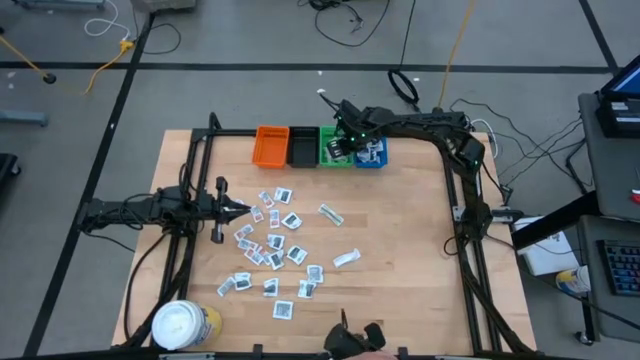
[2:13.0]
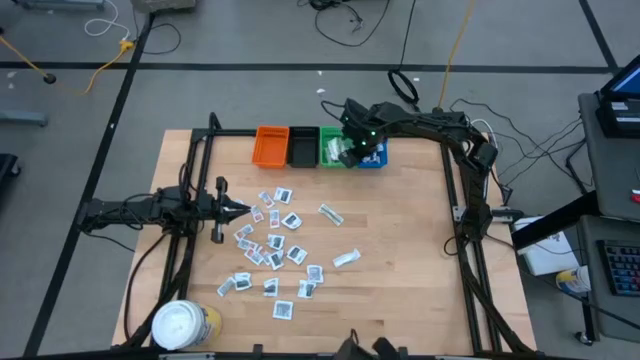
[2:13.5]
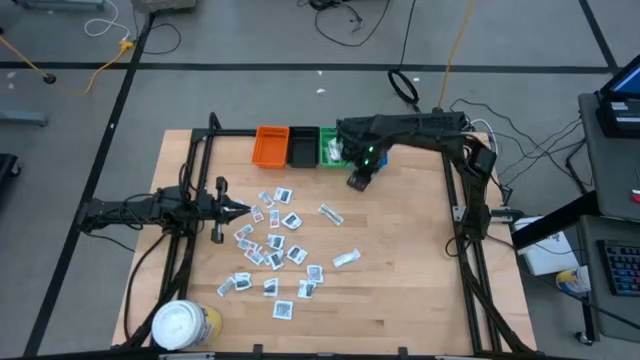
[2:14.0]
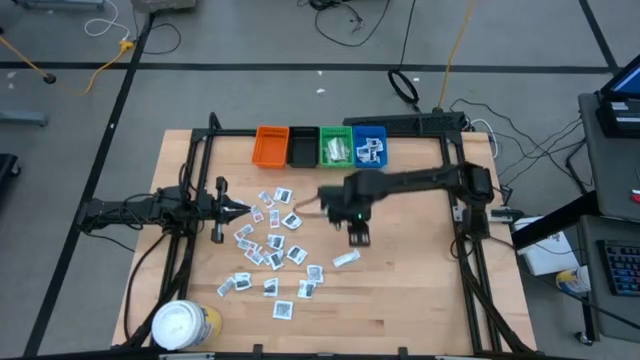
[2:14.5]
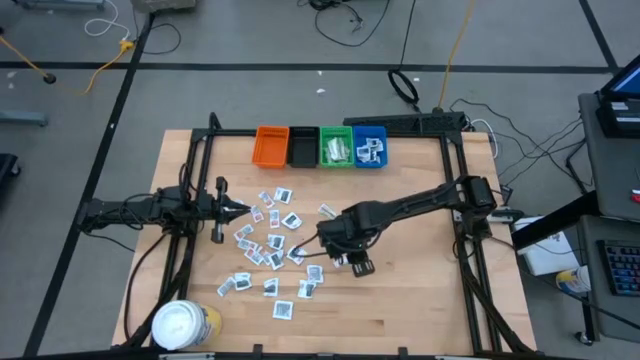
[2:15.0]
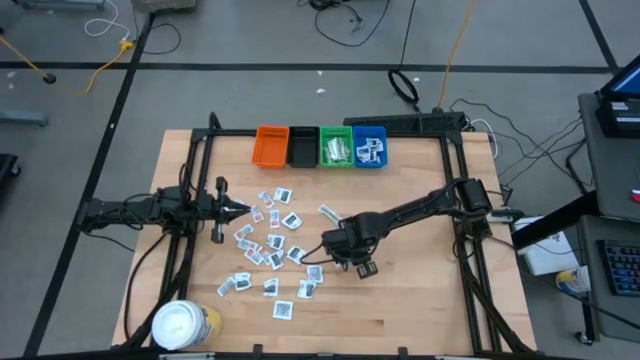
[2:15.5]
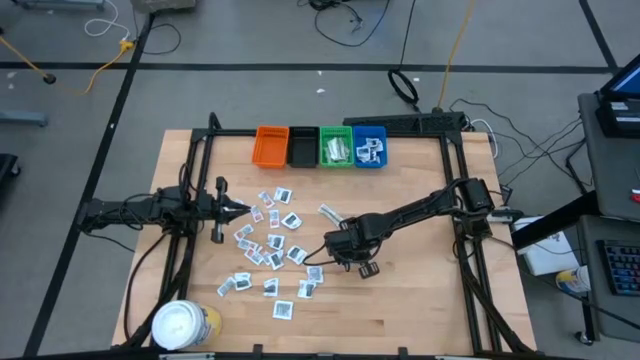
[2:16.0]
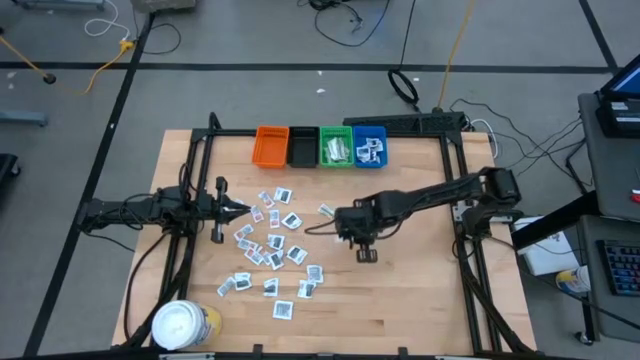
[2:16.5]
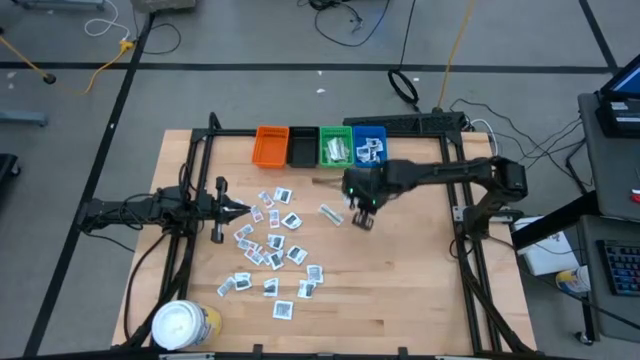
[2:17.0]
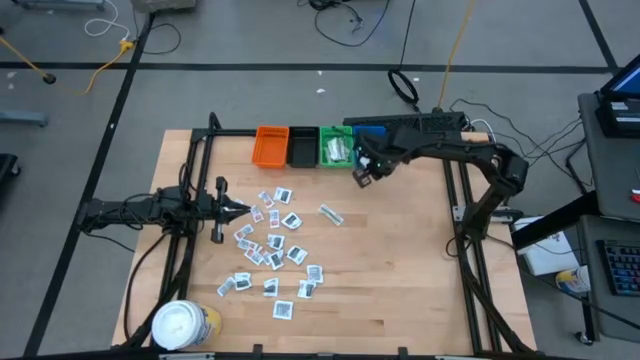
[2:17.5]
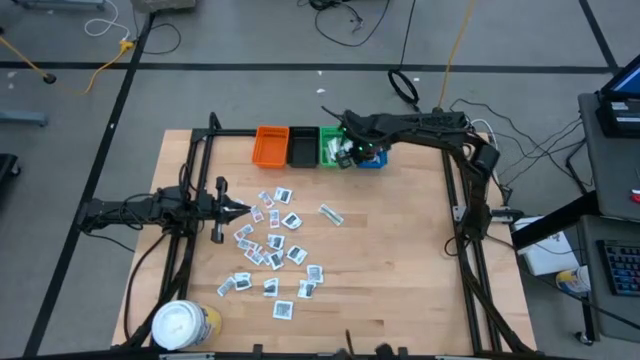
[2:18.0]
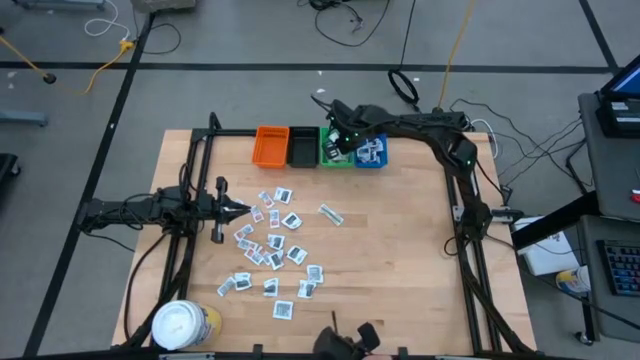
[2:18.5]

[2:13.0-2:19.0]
Task: Pick & Place First Aid Supplies
Put the green bandage into the green bin

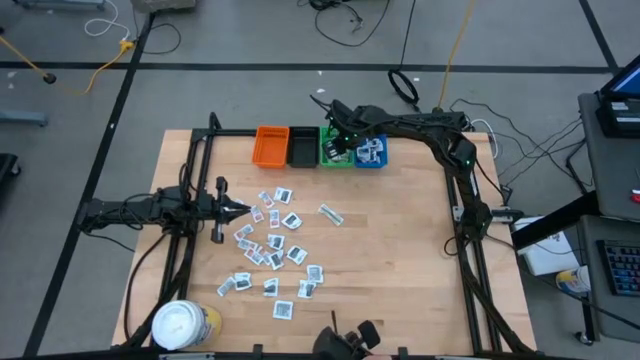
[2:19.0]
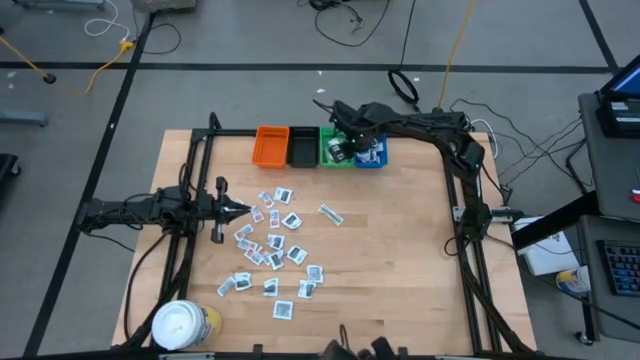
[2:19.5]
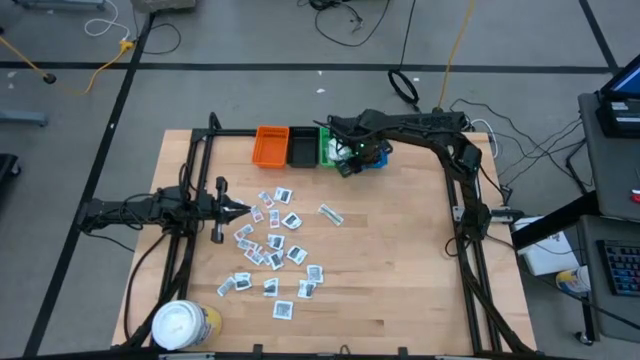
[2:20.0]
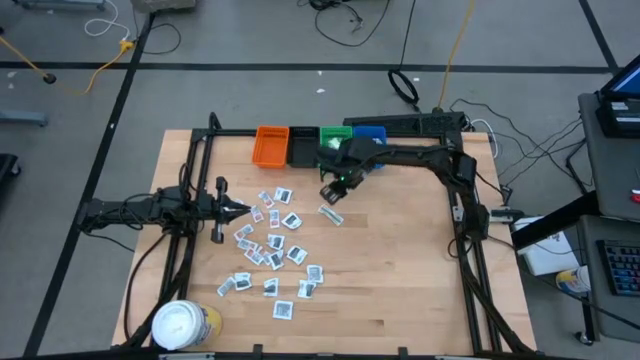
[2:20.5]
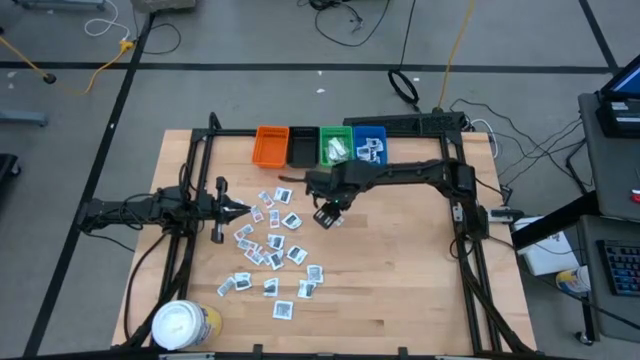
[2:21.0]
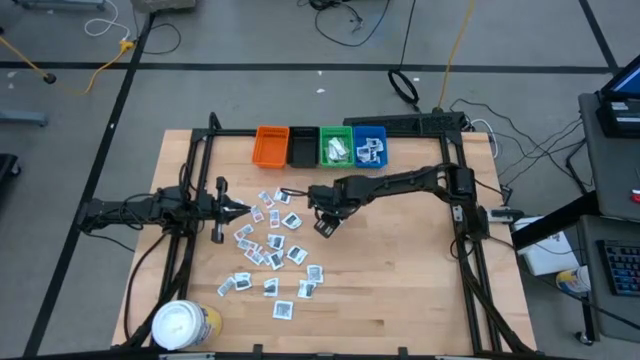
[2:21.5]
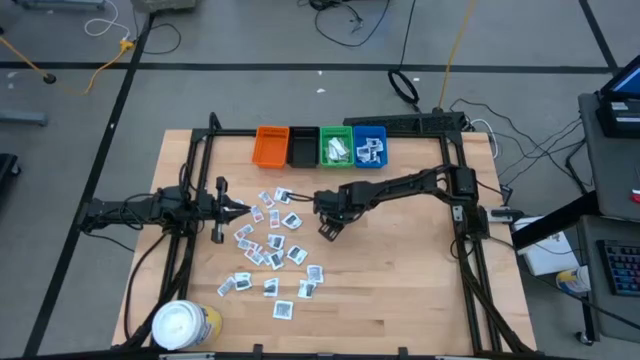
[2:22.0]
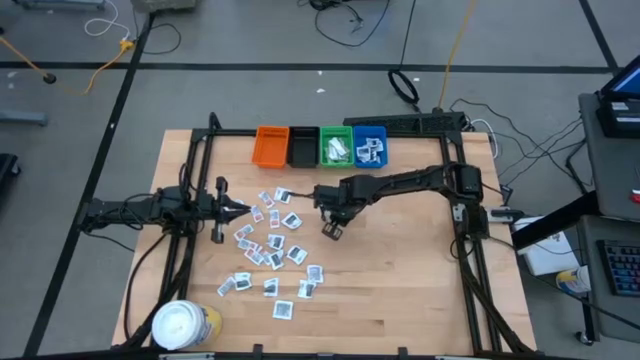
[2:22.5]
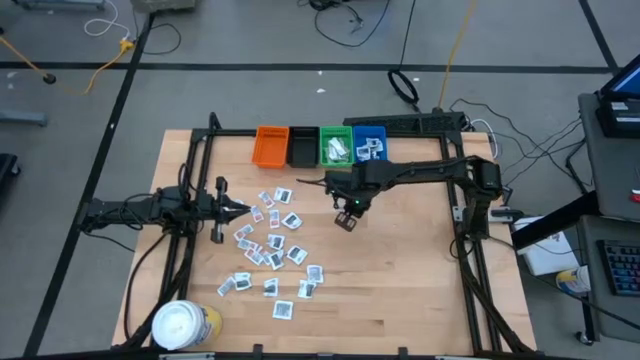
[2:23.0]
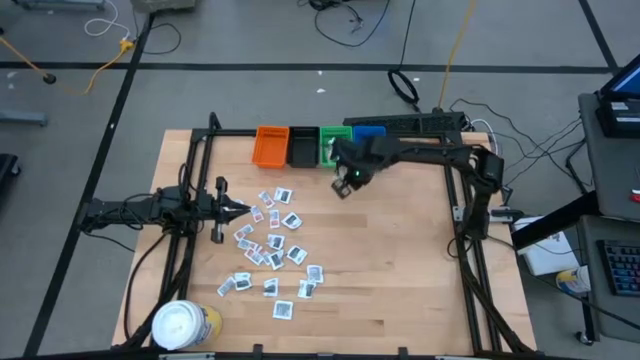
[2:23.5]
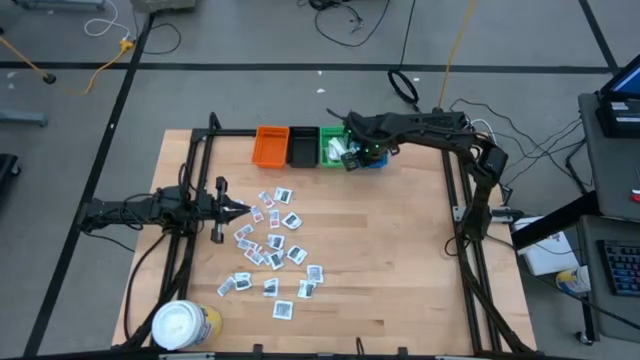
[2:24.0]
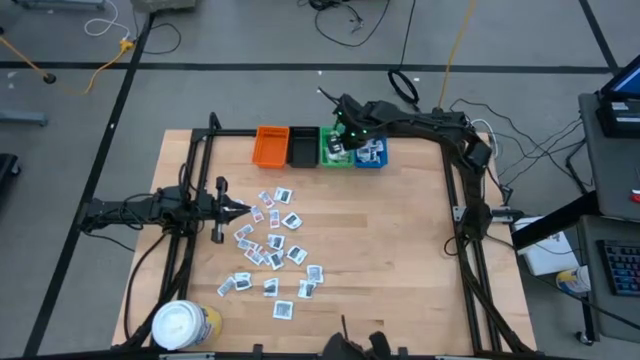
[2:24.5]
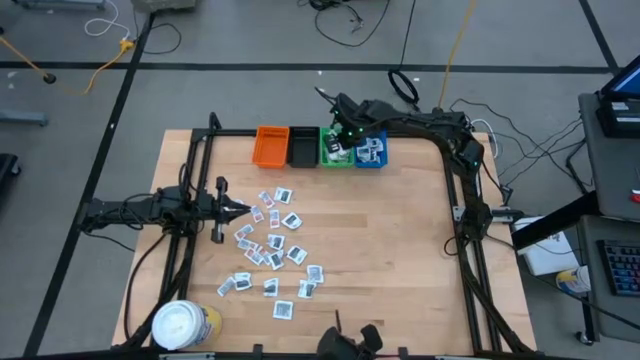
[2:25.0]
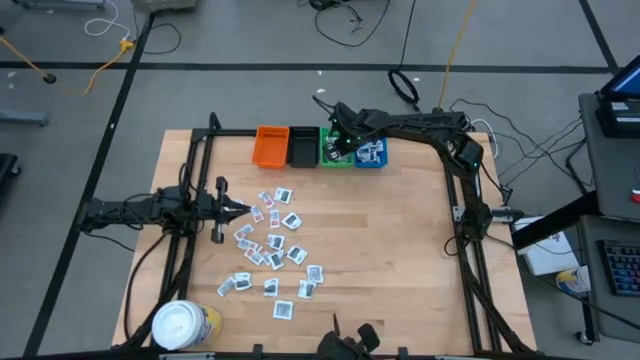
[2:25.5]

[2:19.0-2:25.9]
Put the green bandage into the green bin

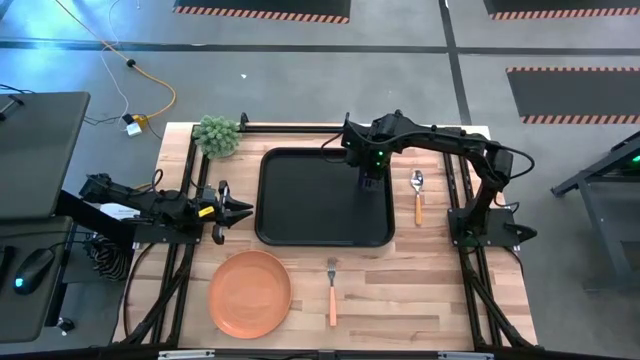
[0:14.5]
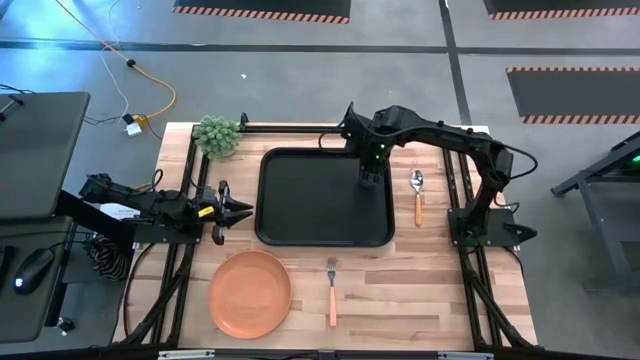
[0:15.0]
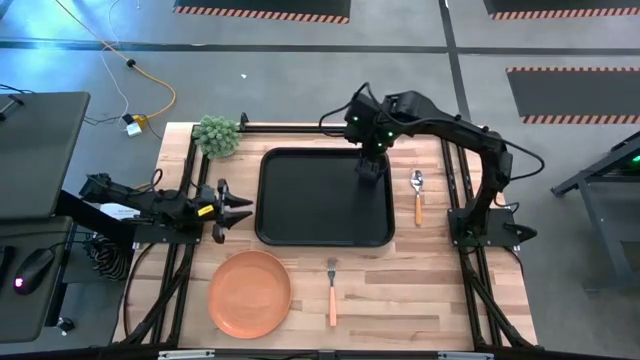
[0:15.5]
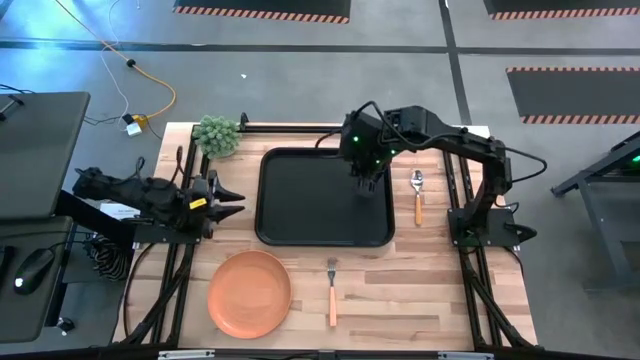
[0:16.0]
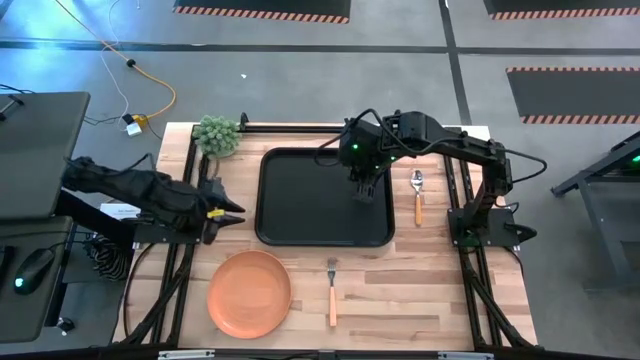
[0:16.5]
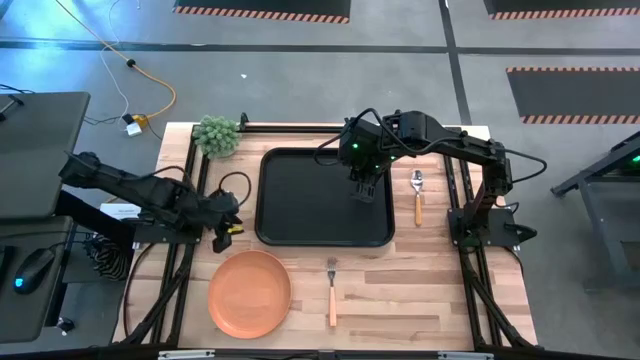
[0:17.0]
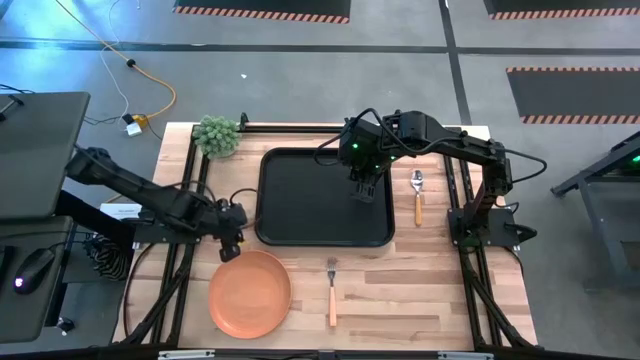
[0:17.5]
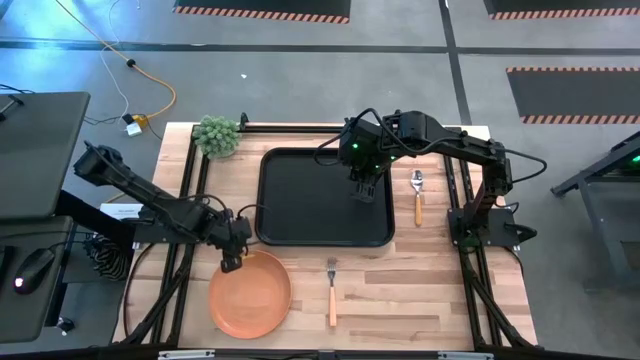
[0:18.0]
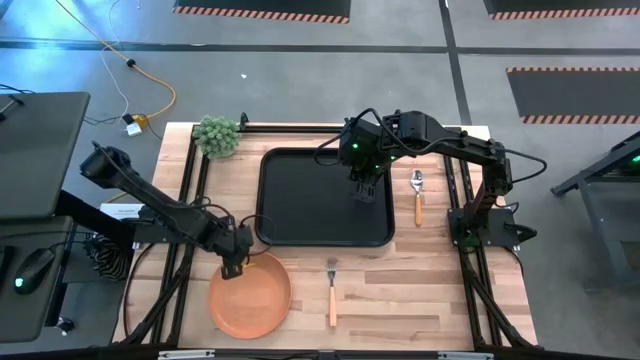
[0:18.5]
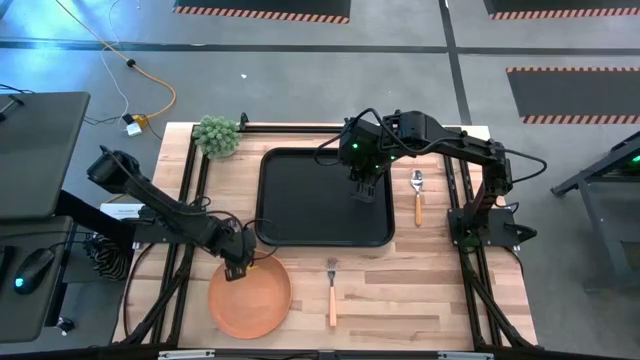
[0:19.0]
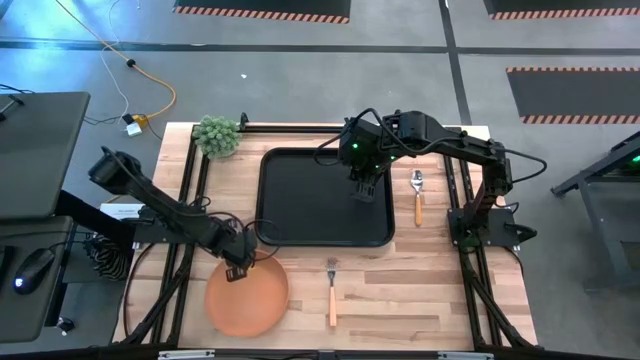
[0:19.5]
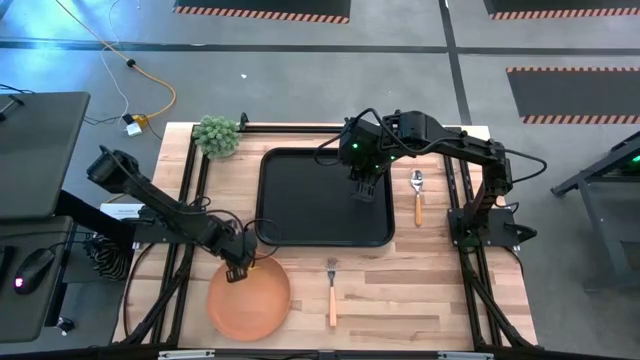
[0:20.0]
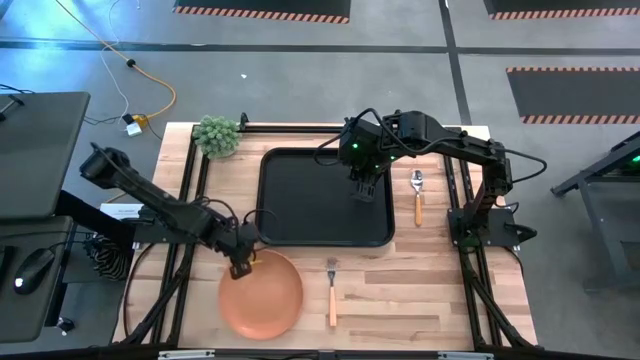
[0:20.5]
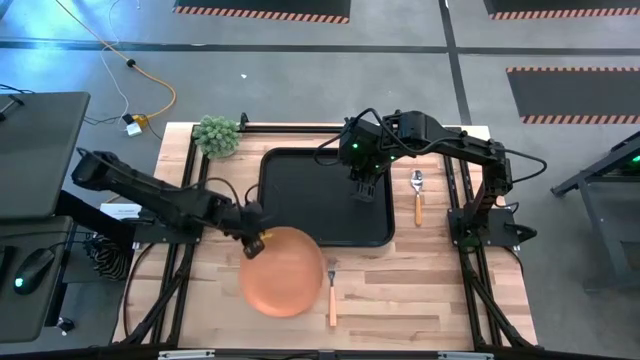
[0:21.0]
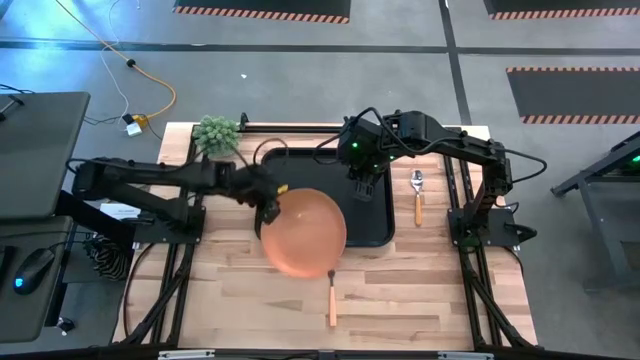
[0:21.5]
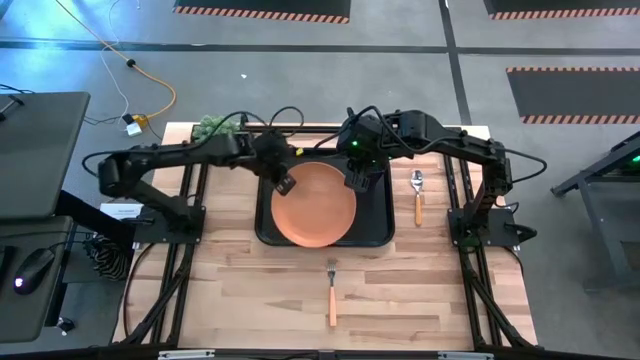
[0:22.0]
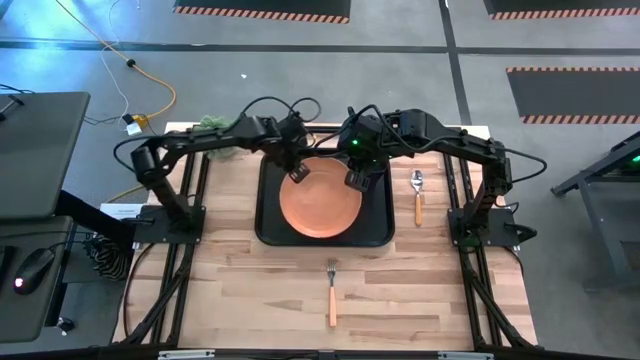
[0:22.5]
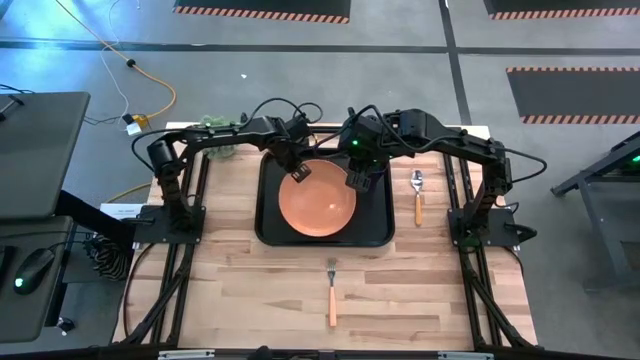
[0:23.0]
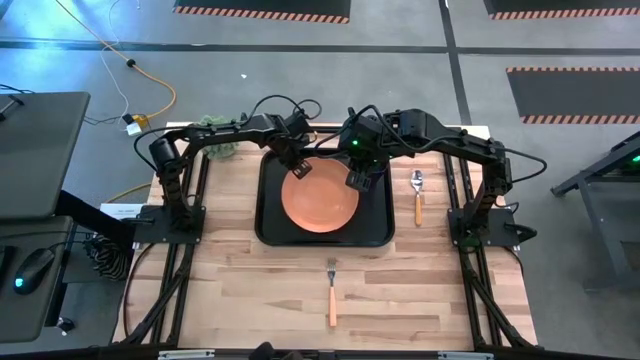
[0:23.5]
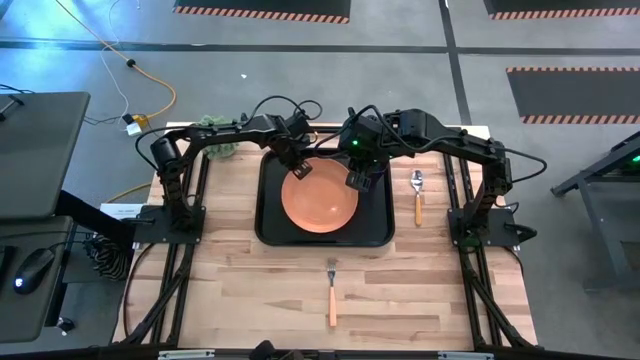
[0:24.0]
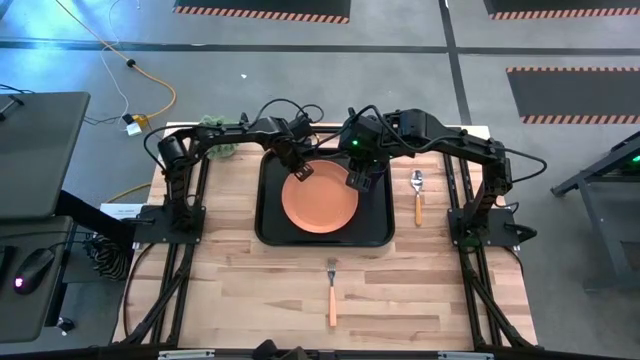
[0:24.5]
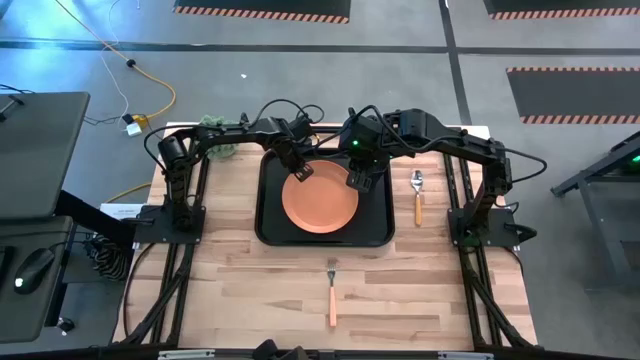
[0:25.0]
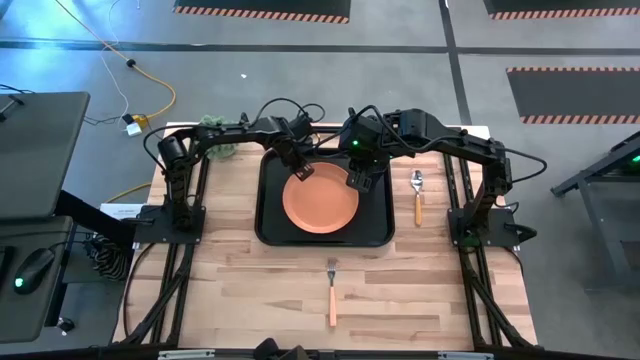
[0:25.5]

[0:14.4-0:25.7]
Task: Pick and place plate/cup/fork/spoon on tray
Put the orange plate to the left side of the violet cup on the black serving tray
